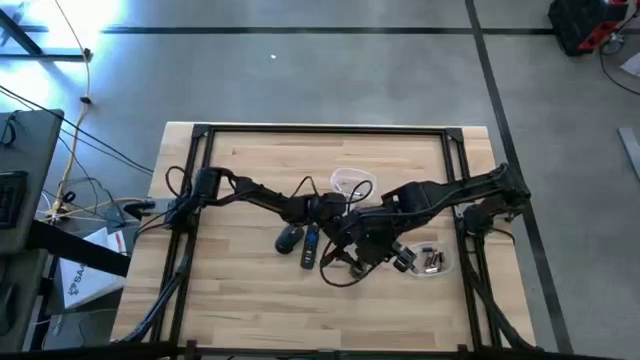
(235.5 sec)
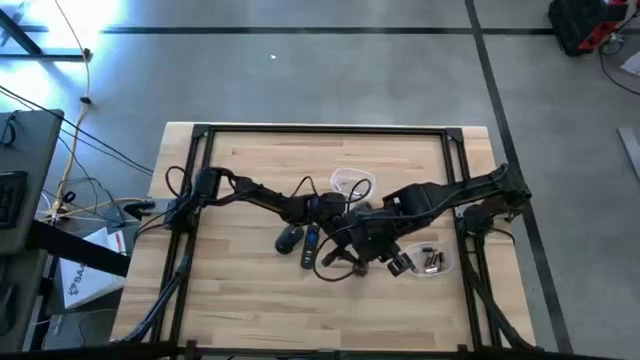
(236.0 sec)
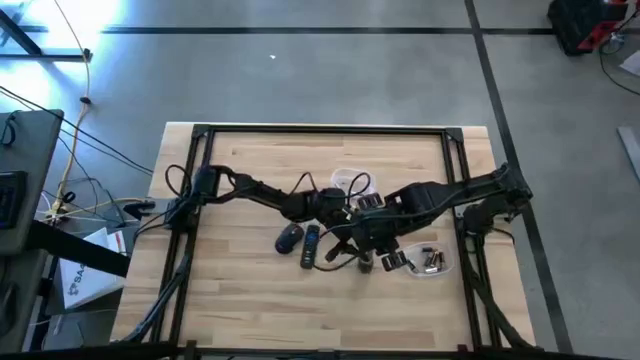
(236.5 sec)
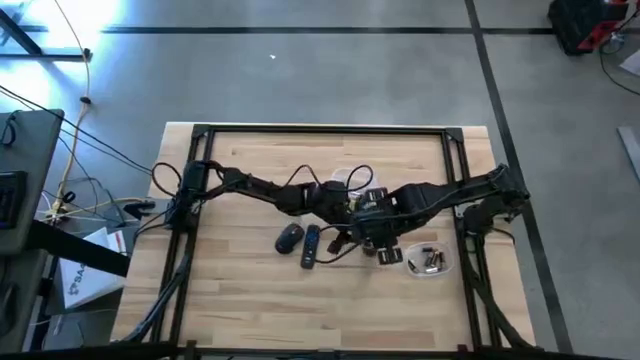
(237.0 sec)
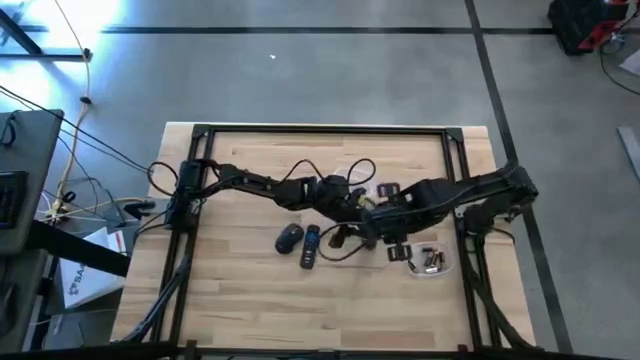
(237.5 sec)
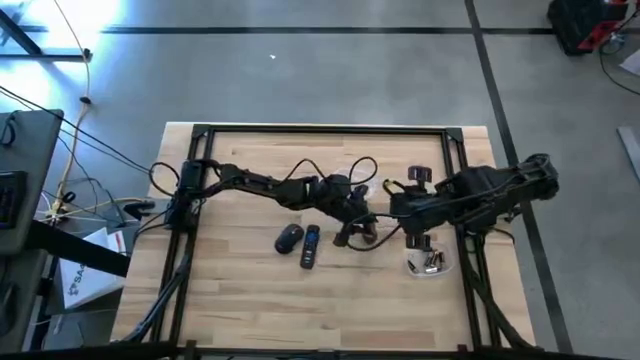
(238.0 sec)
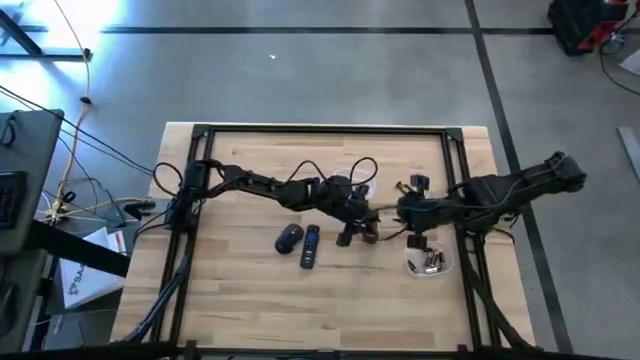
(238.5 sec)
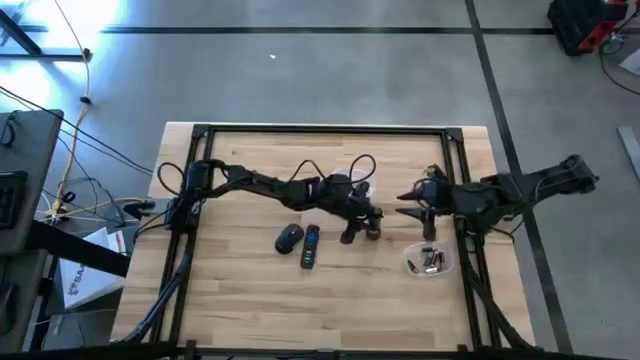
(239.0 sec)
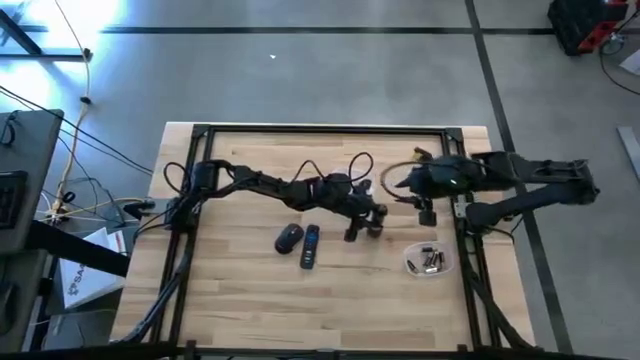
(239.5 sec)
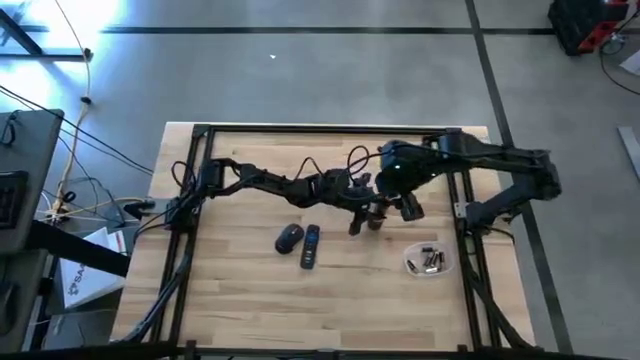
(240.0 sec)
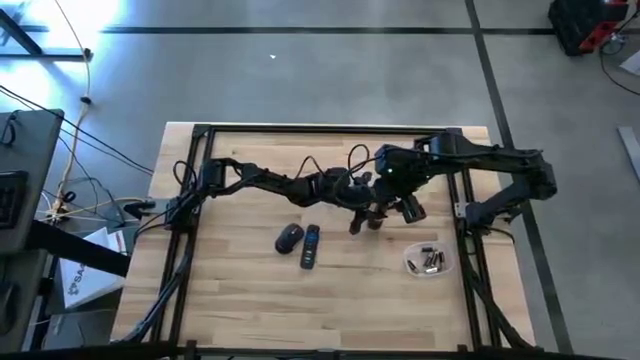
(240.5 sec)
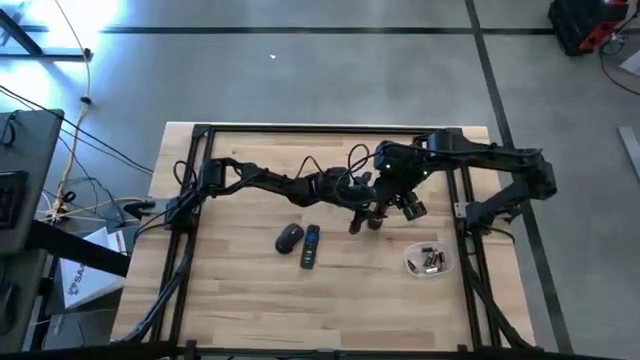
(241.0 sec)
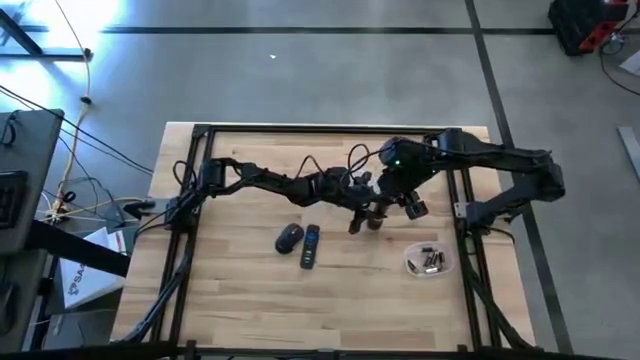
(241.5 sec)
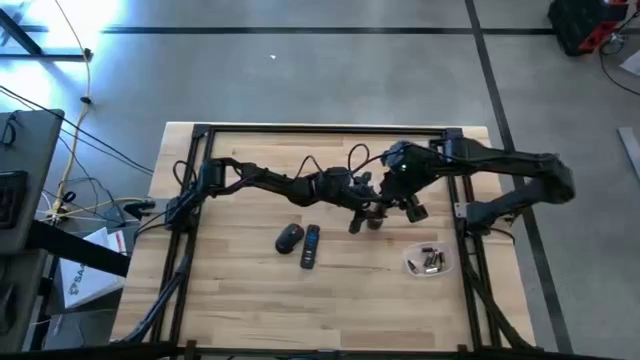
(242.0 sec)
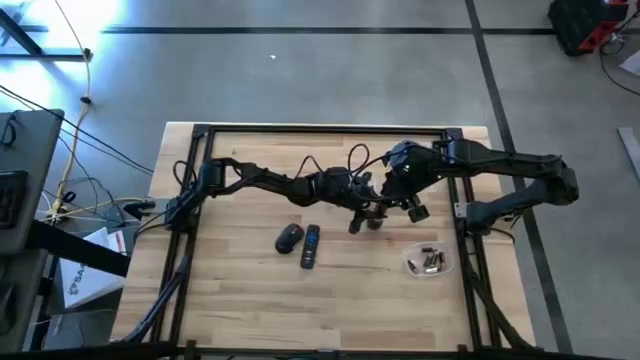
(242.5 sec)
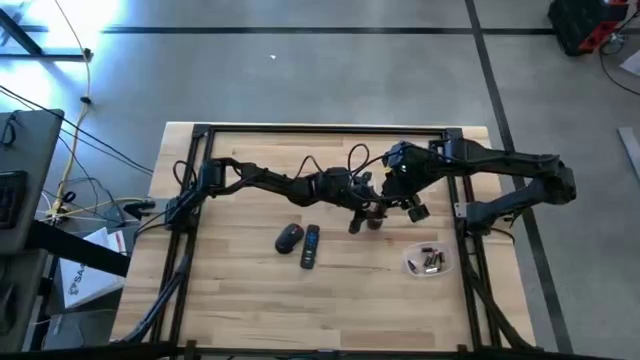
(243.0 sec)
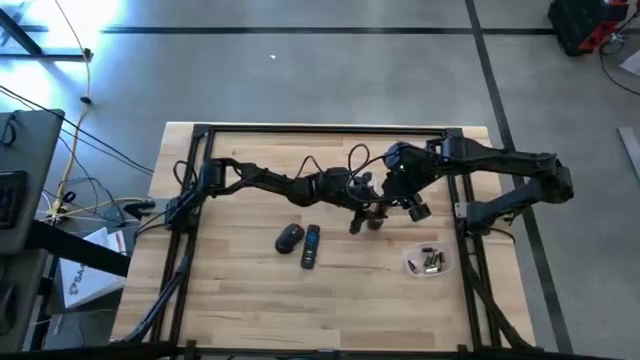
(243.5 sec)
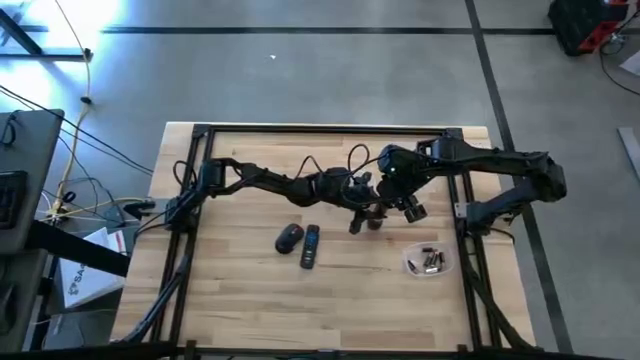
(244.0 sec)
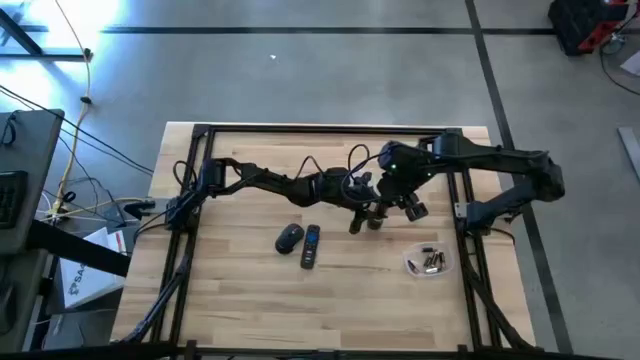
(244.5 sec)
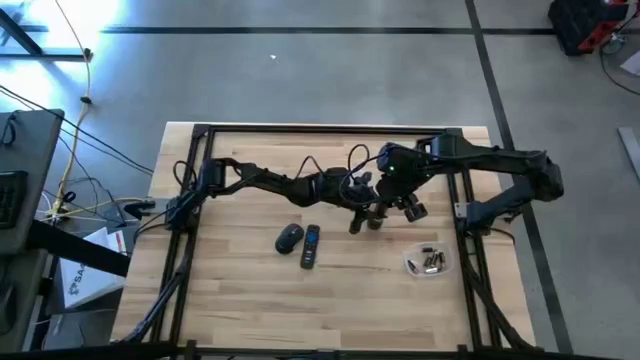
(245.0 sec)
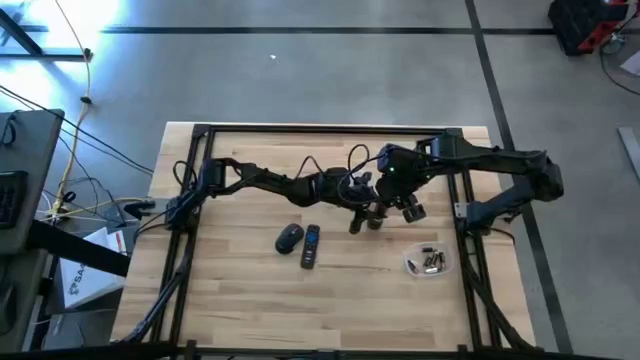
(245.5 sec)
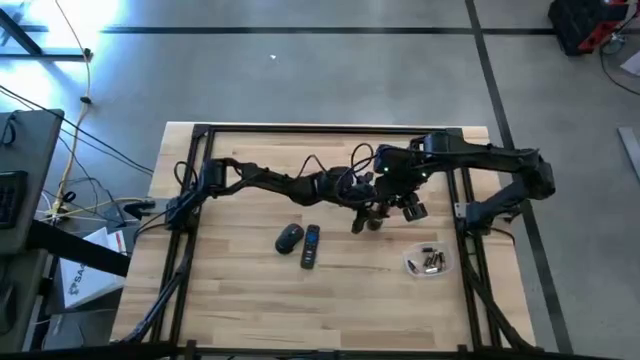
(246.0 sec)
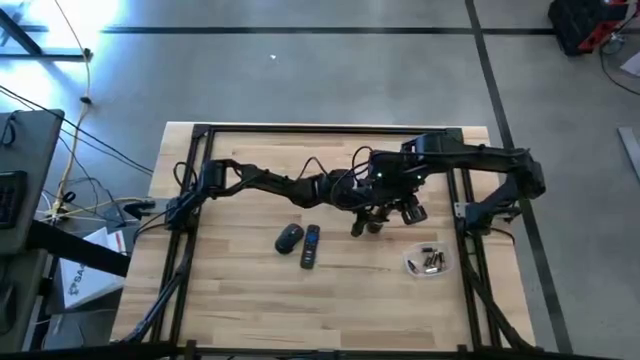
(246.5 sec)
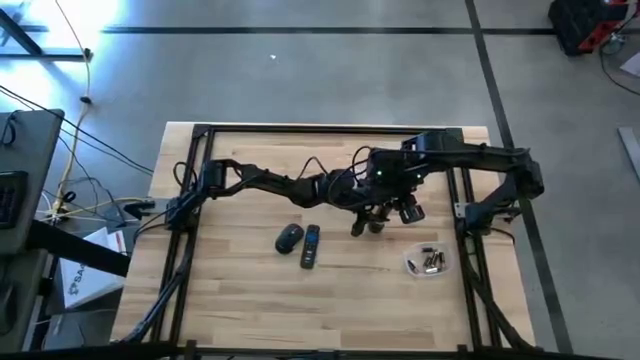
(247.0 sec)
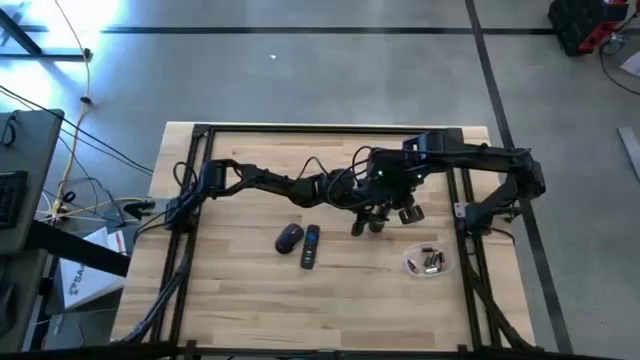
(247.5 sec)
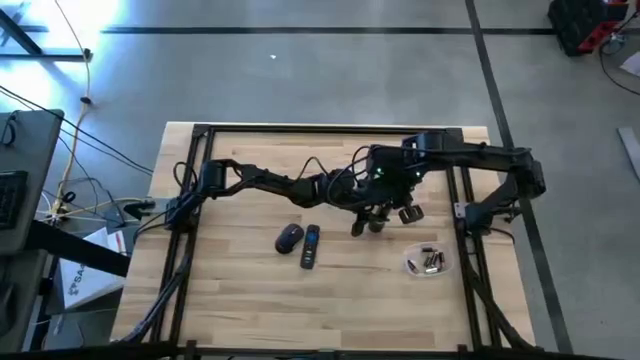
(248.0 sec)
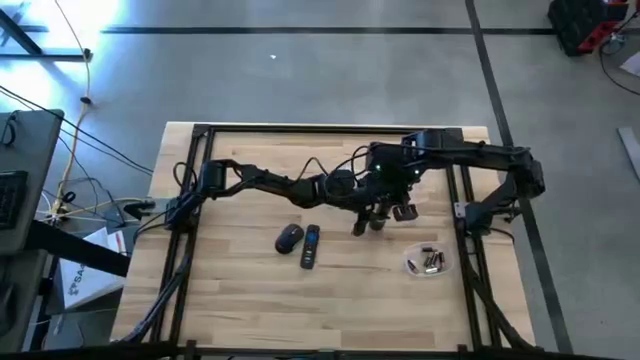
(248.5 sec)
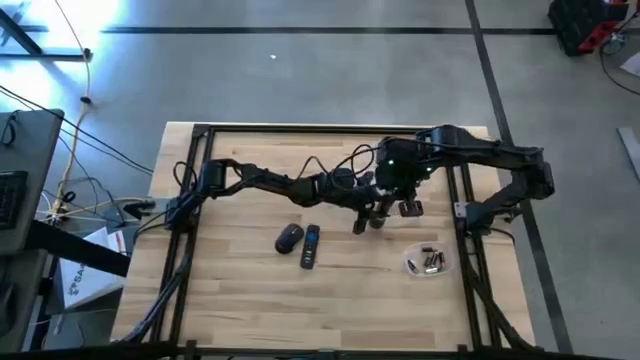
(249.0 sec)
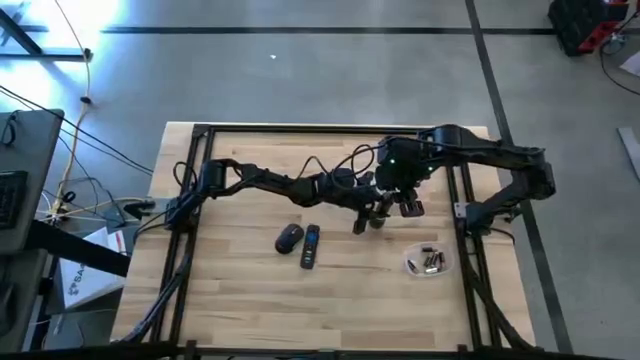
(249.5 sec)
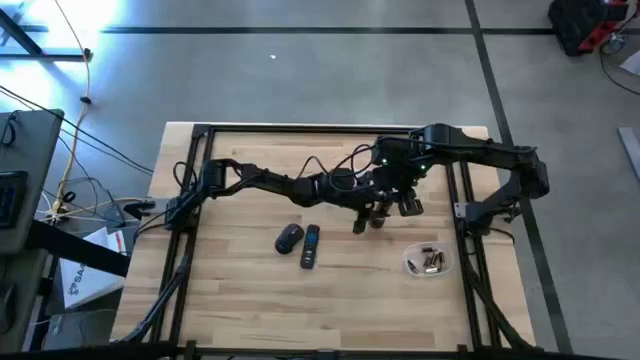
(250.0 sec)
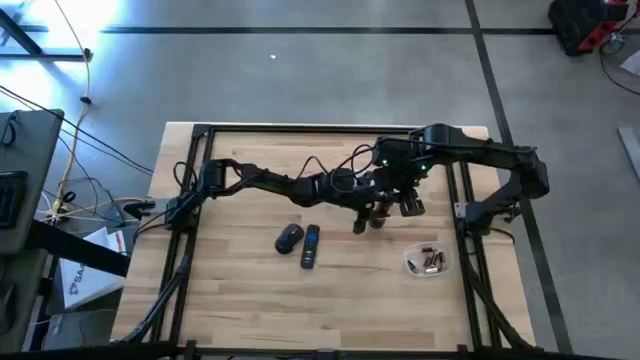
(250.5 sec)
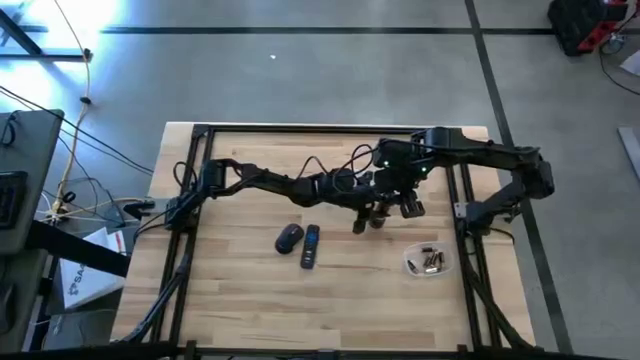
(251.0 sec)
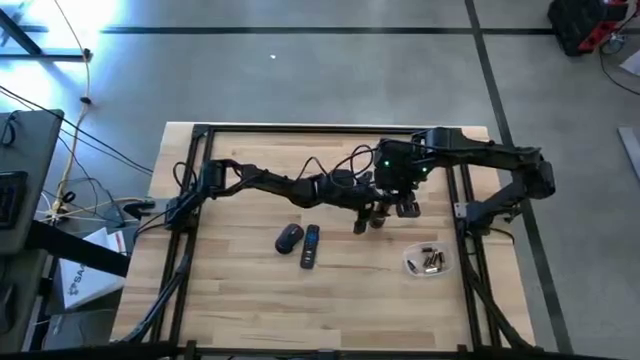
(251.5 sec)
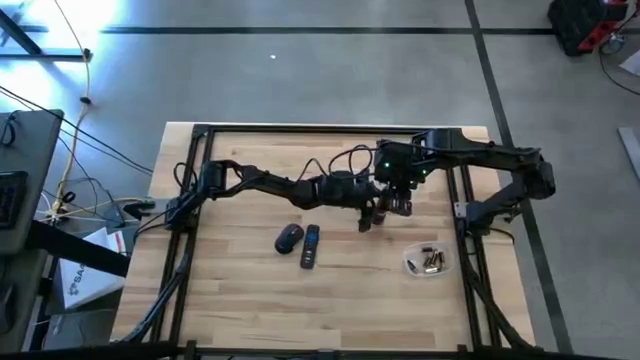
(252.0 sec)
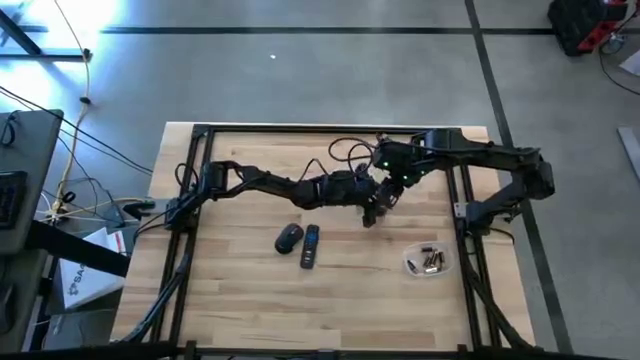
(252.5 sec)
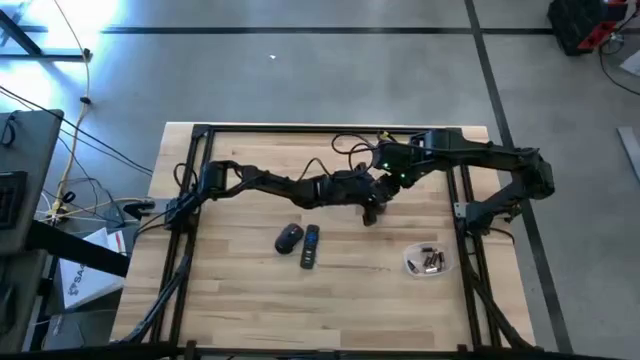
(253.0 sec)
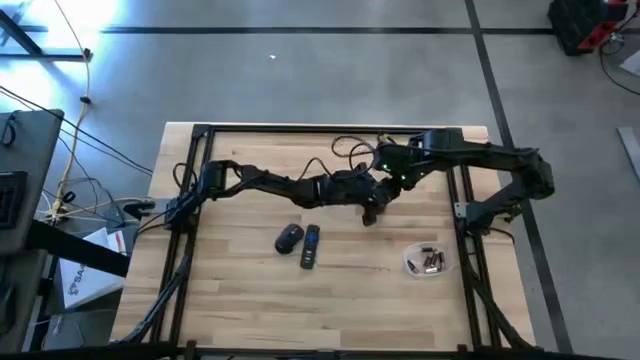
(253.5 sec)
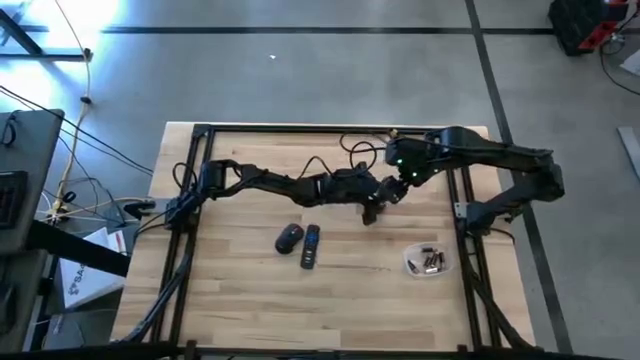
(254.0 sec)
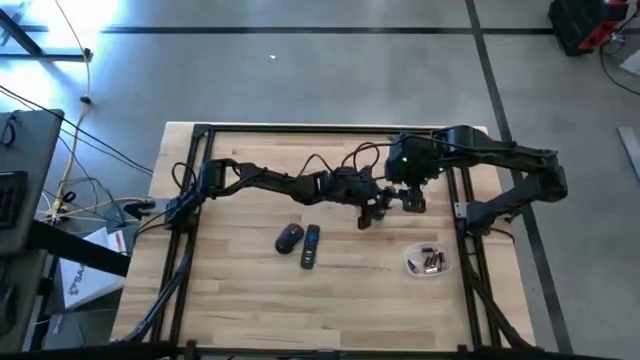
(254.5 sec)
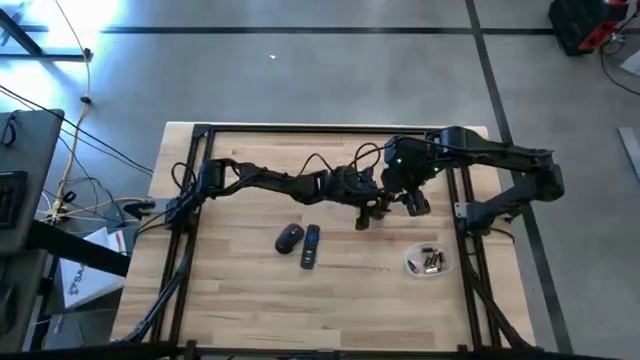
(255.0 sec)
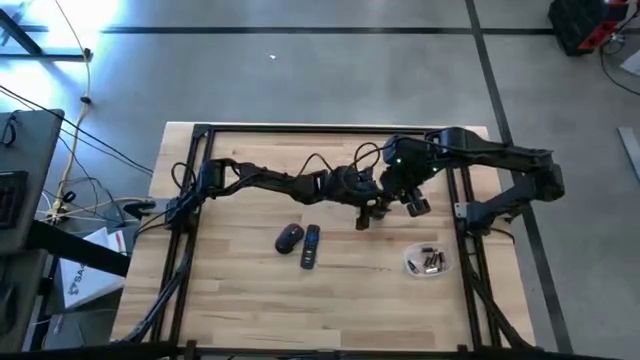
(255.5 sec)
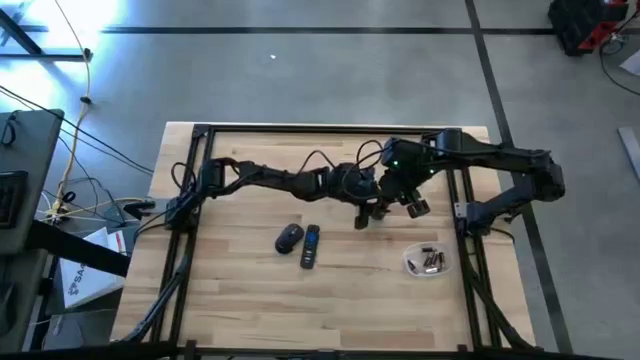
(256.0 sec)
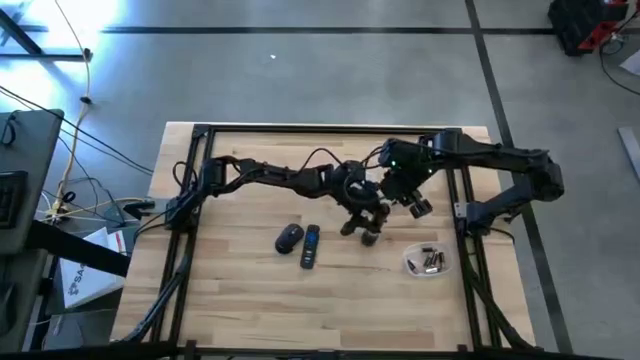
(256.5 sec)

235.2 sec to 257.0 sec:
Task: Insert battery
Close the flashlight battery compartment
